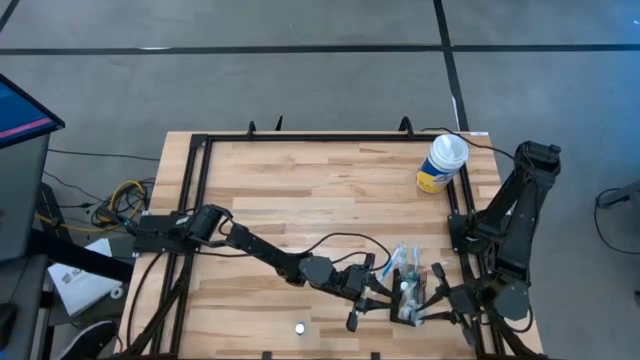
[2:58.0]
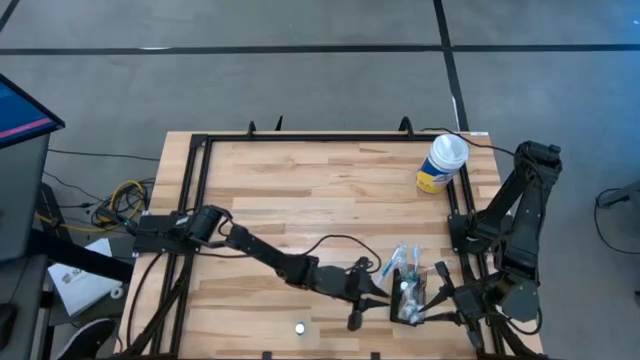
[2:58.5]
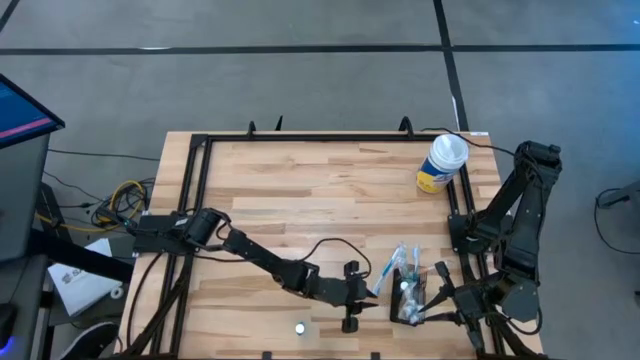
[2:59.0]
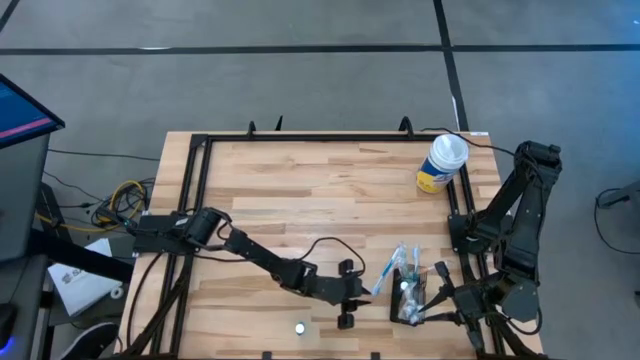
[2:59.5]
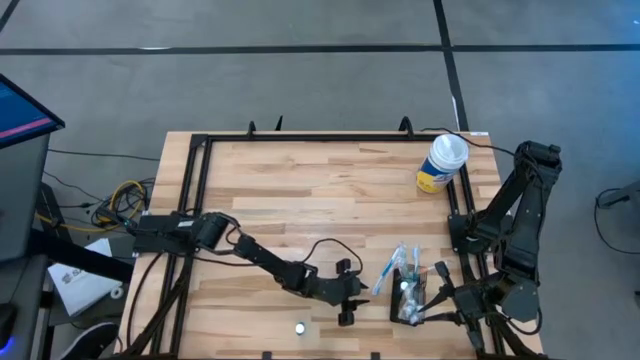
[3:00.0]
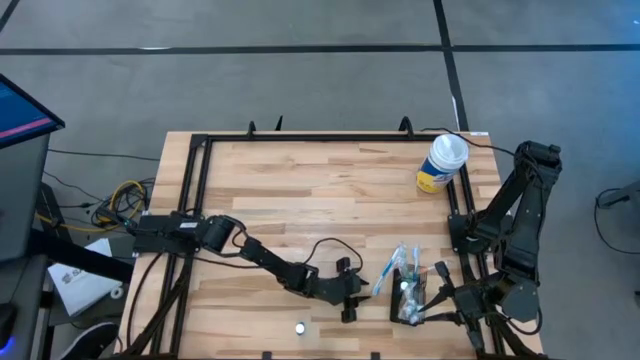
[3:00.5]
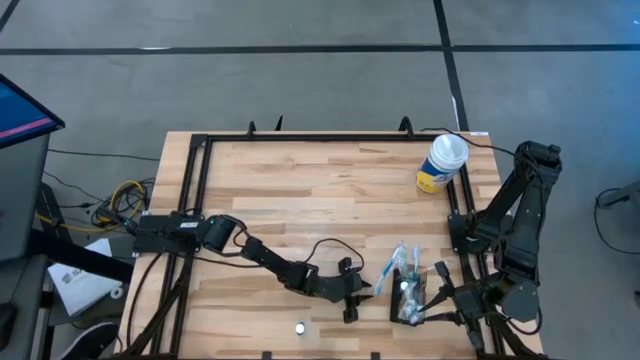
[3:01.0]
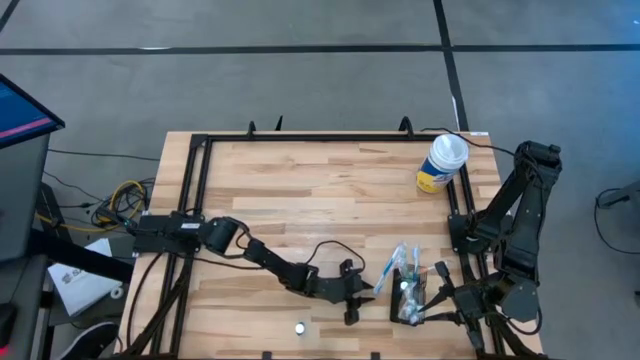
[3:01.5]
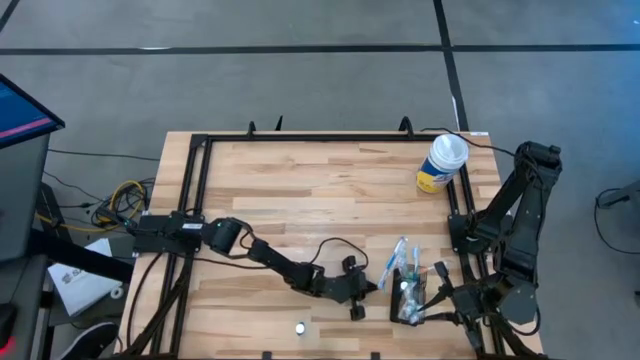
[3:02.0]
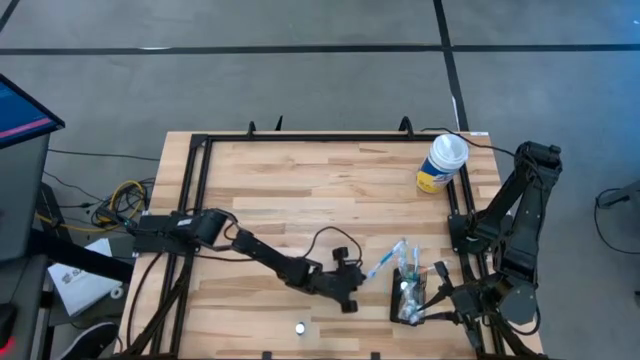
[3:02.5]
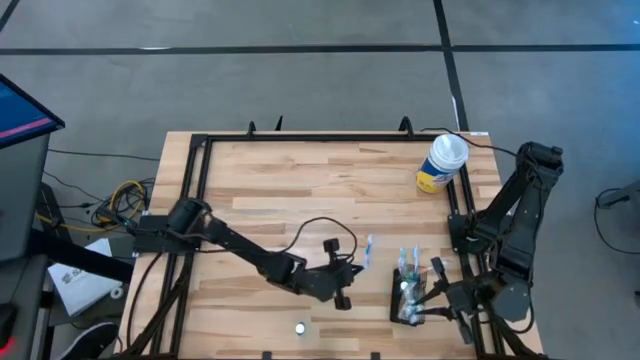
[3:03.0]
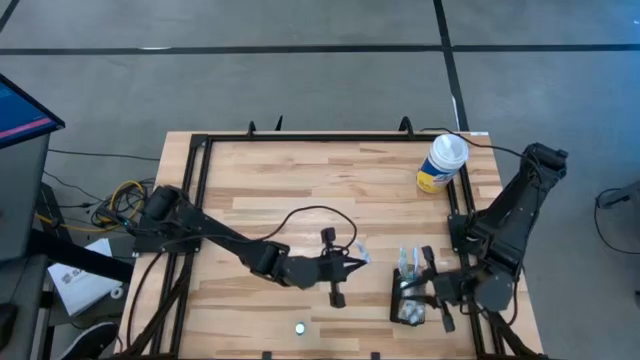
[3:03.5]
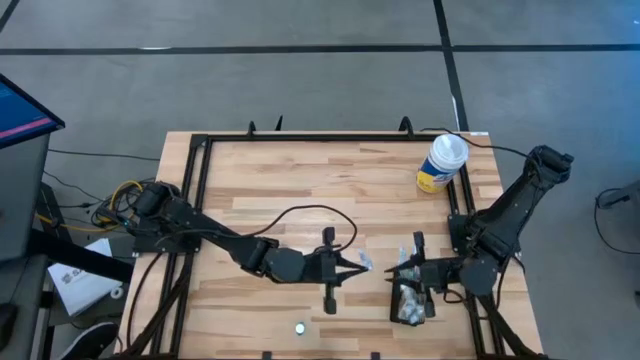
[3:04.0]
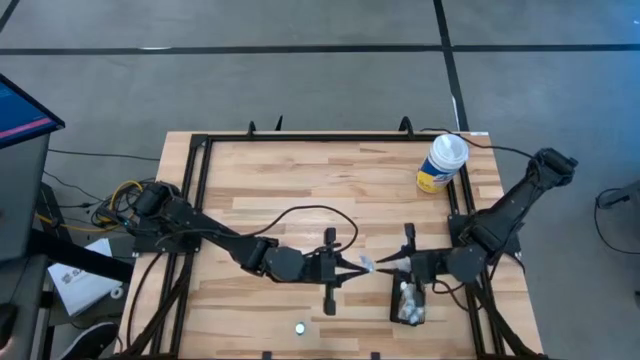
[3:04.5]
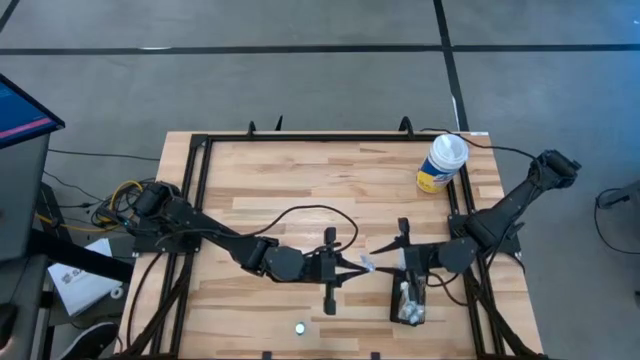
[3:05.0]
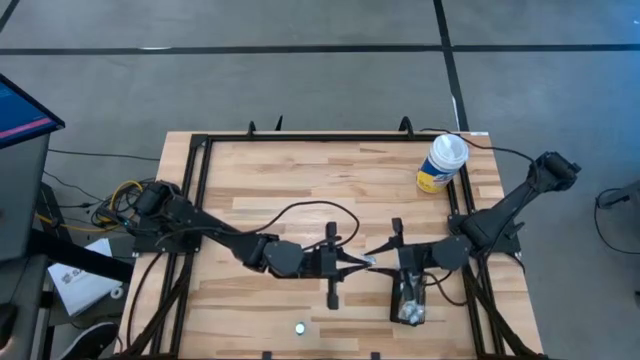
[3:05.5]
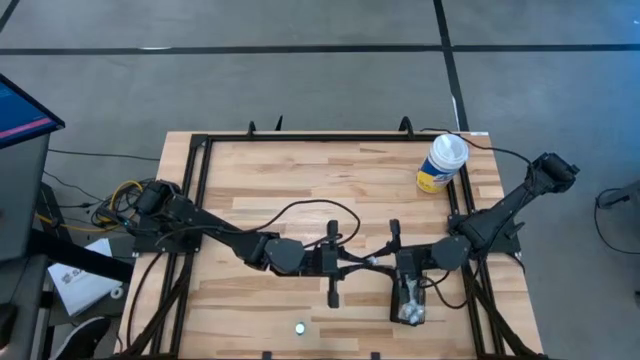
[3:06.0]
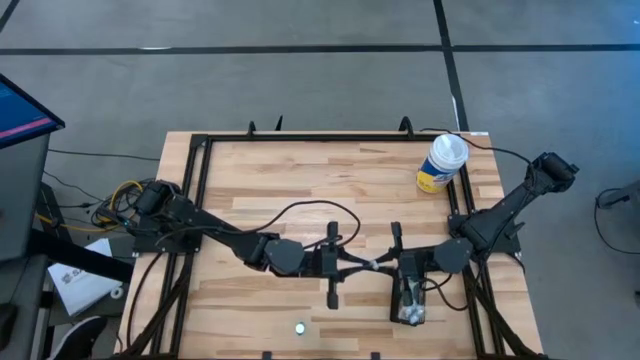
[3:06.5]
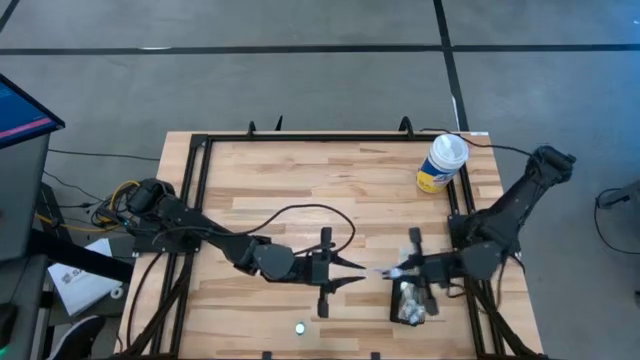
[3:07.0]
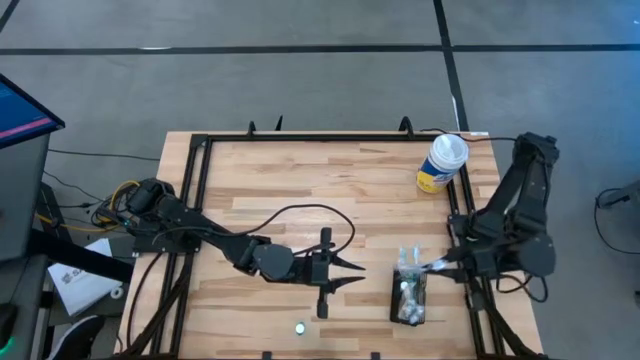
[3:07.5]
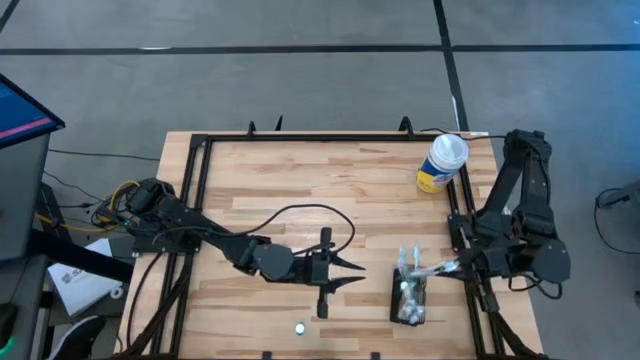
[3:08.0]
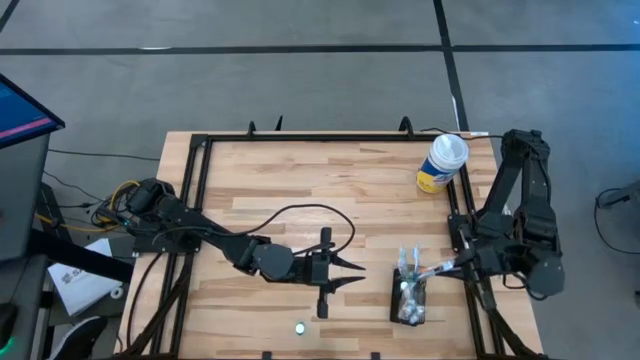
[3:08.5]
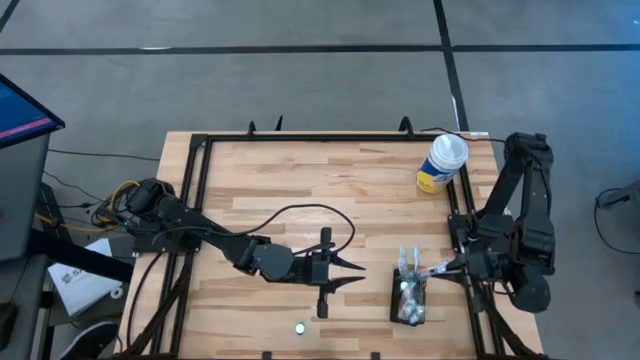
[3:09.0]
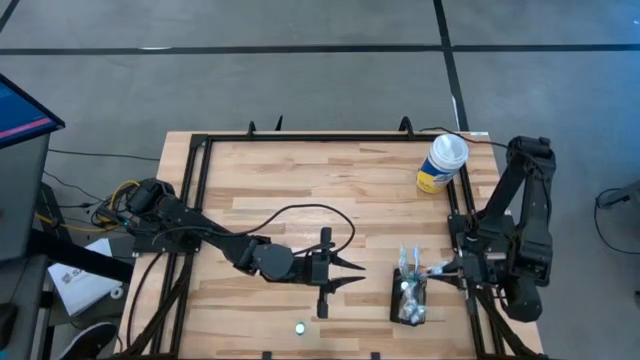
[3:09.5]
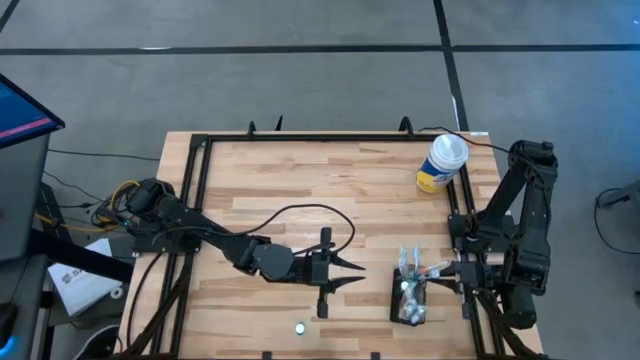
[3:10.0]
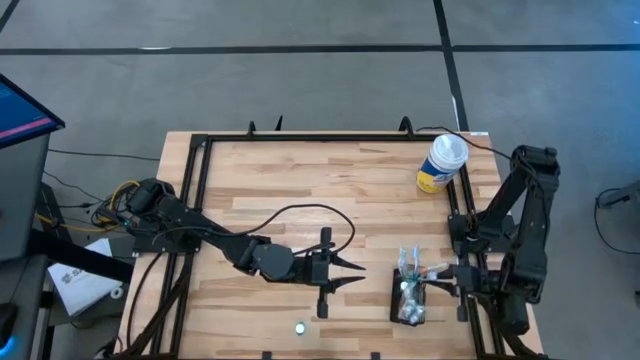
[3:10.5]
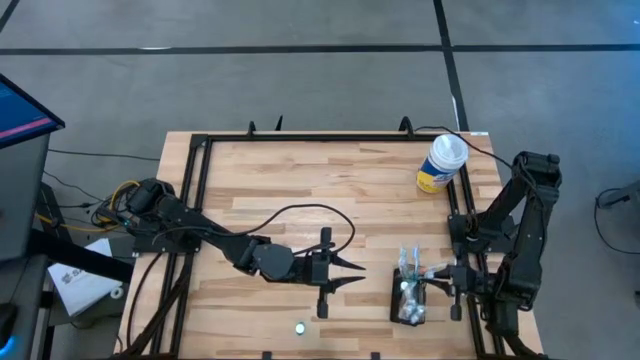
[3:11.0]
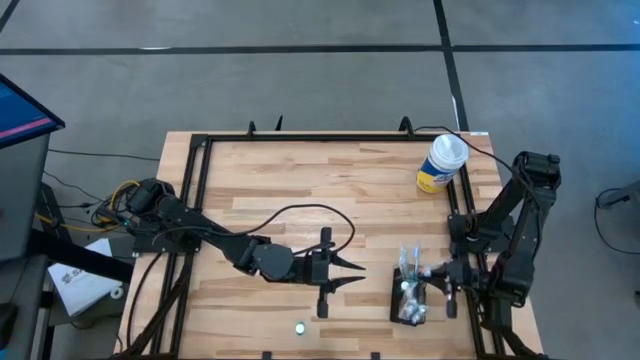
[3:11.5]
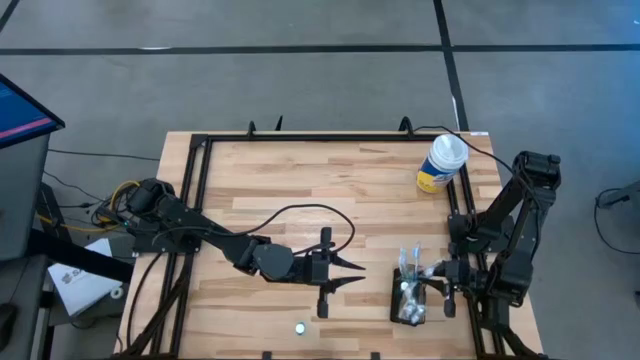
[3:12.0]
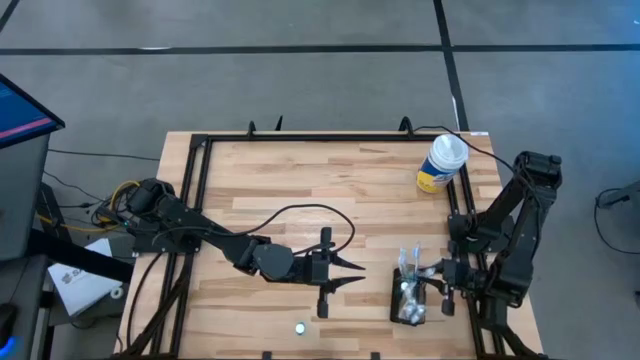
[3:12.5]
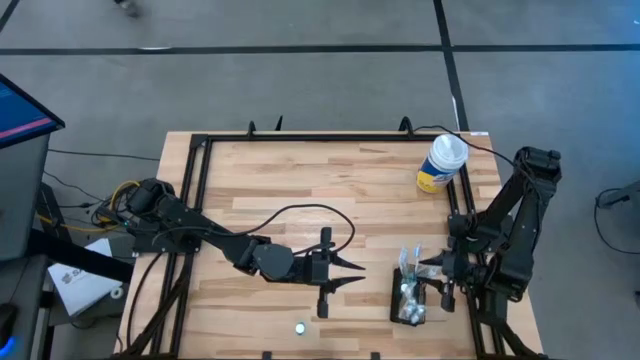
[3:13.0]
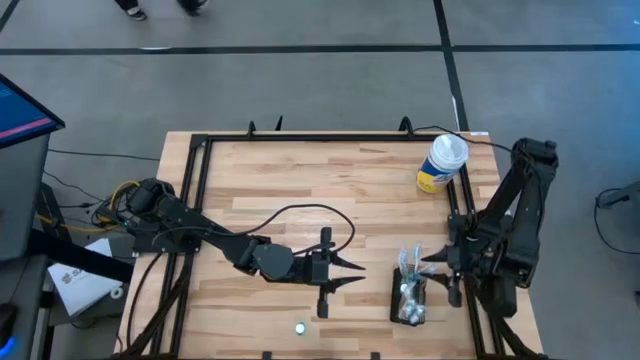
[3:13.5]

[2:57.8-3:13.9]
Task: Pick & Place toothbrushing station
Put the blue toothbrush into the black wire organizer

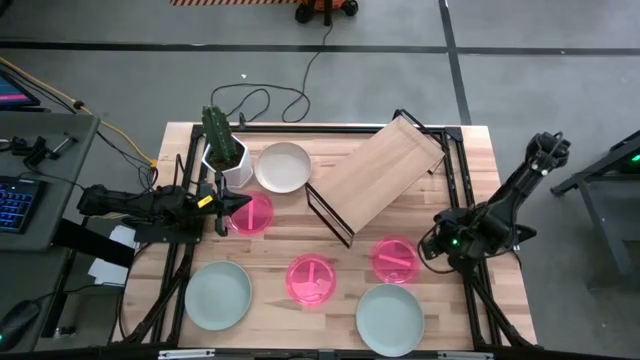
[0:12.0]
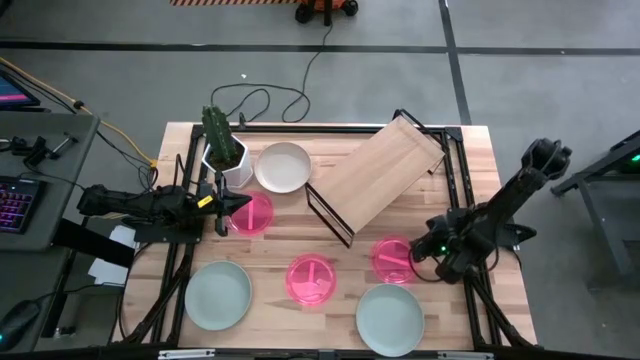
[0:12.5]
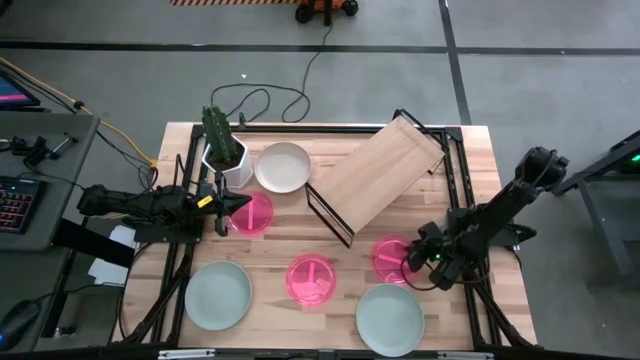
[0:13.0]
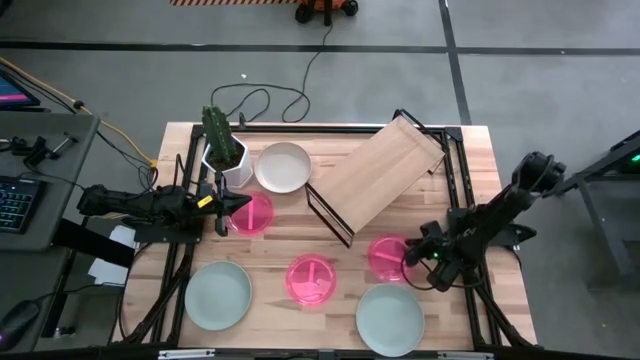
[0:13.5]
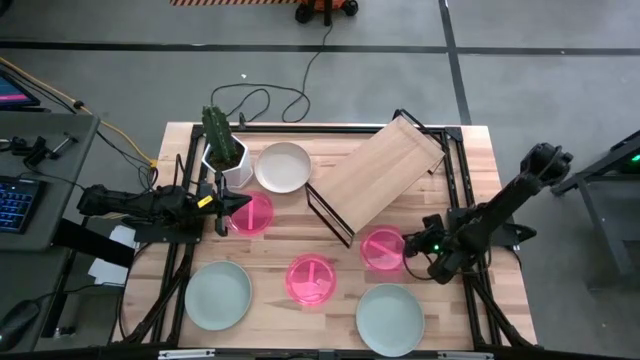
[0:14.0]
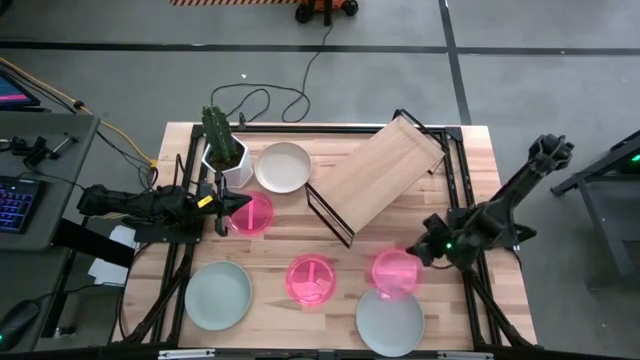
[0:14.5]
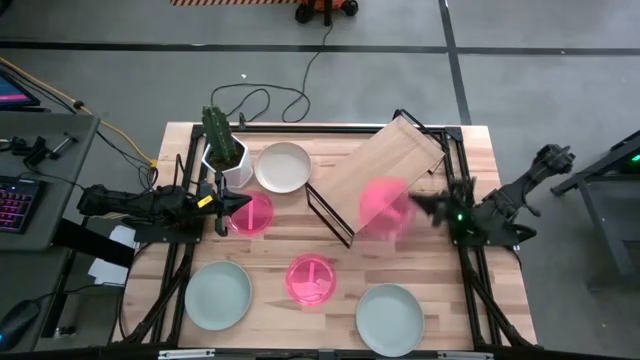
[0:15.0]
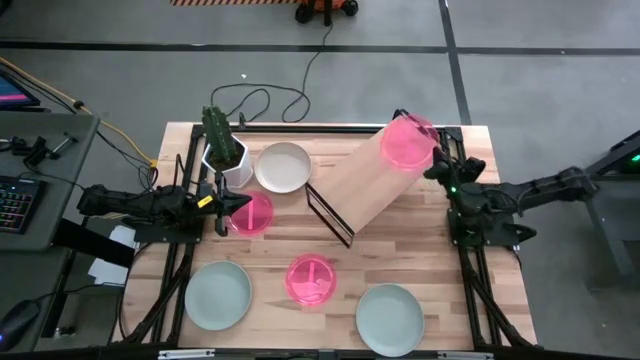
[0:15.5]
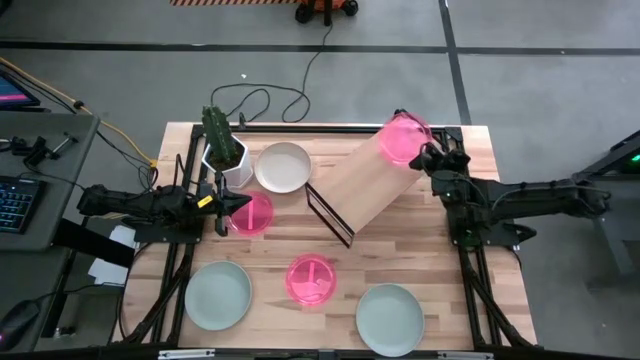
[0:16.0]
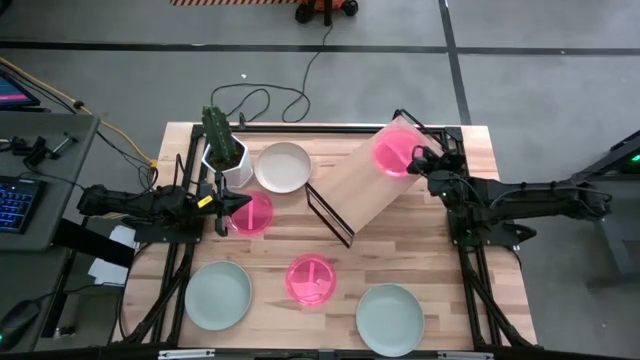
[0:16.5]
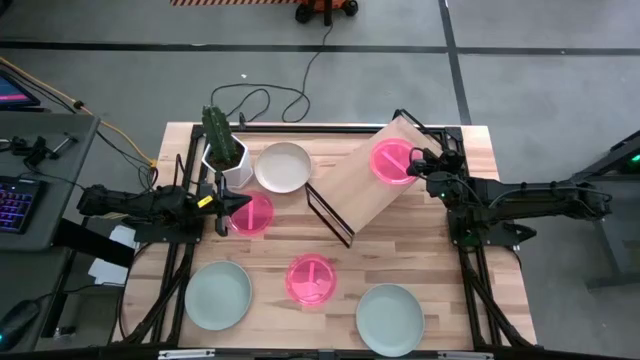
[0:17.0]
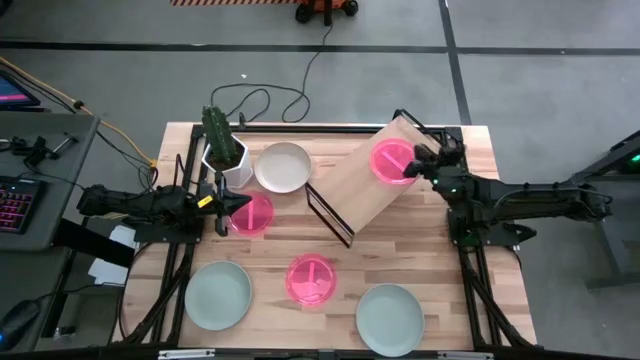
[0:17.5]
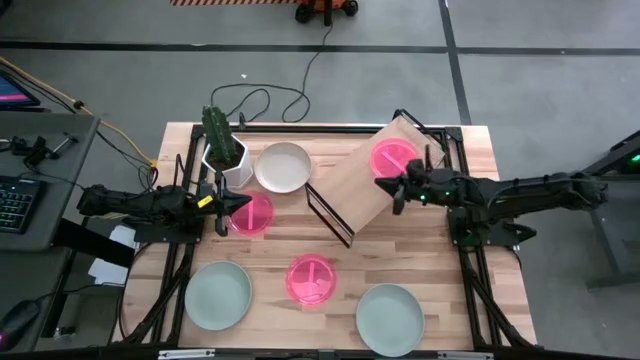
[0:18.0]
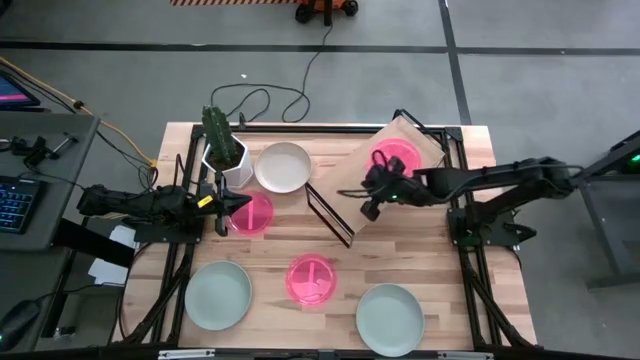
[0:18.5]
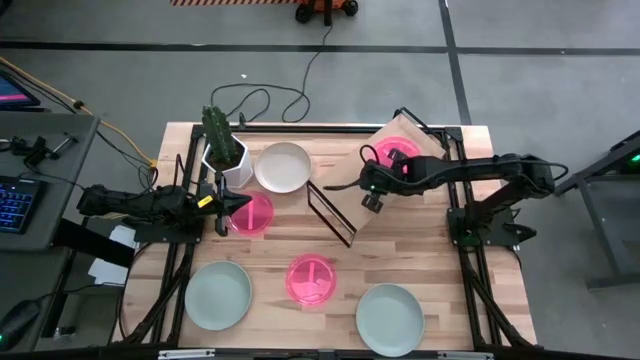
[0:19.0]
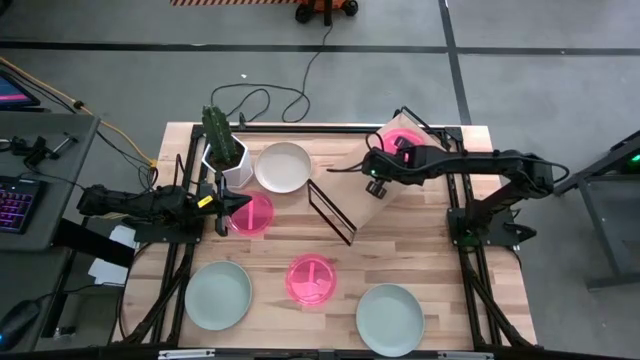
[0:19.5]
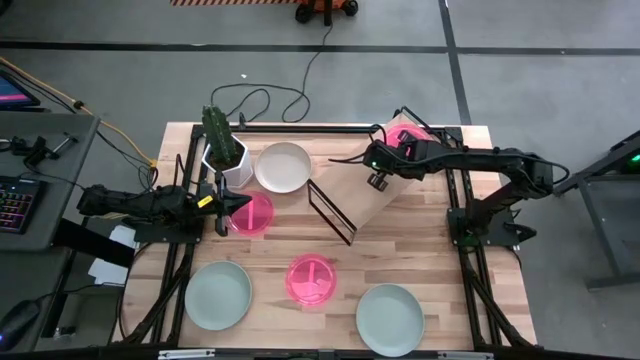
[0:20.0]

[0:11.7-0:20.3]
Task: Place and stack plates onto a shelf
Put the right pink plate on the shelf
